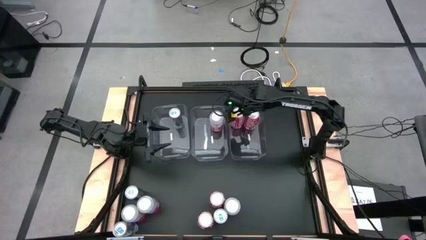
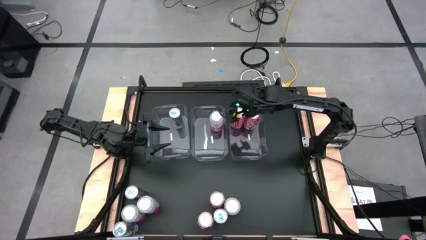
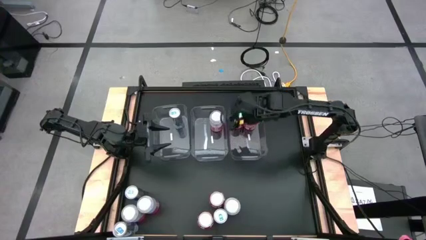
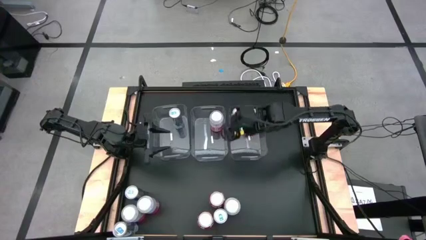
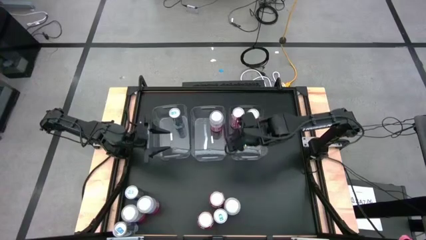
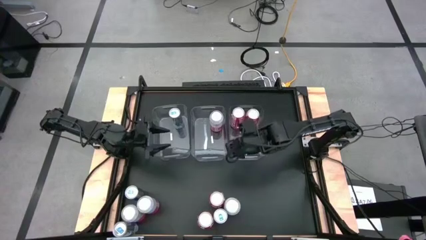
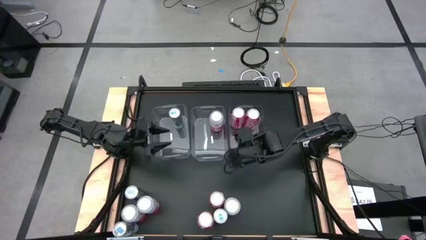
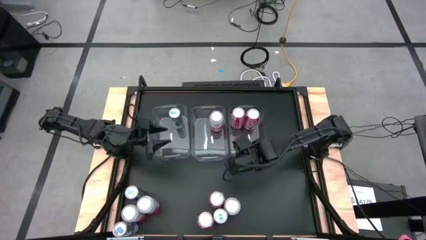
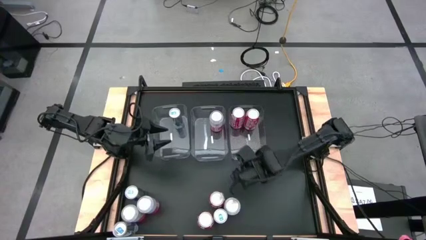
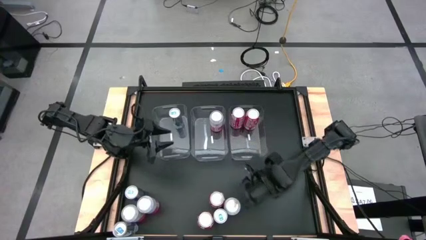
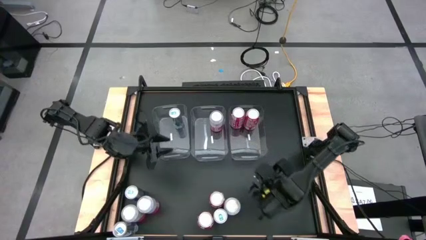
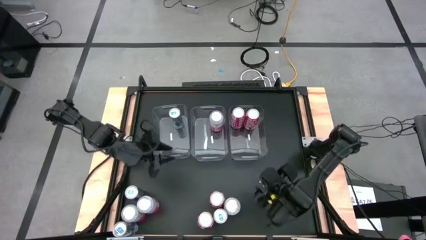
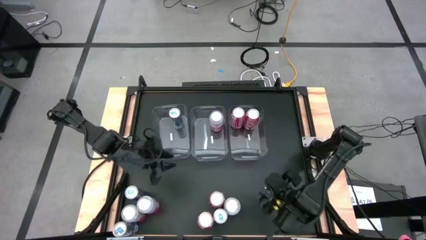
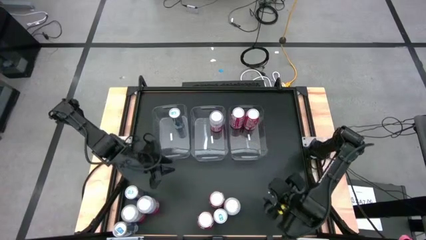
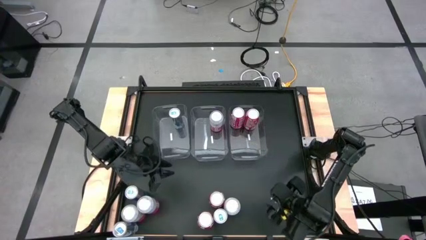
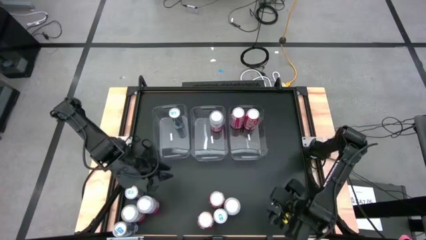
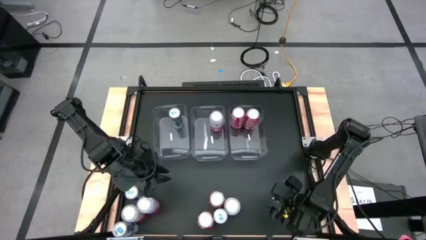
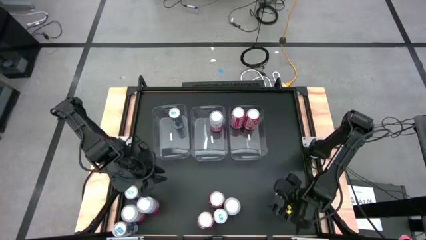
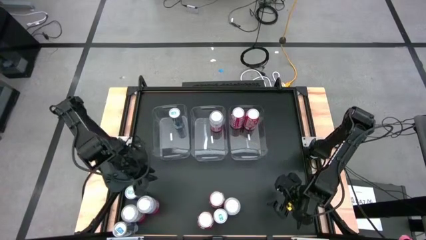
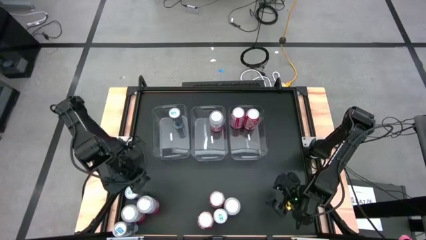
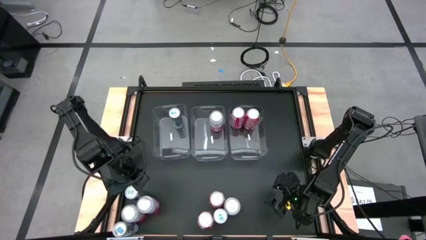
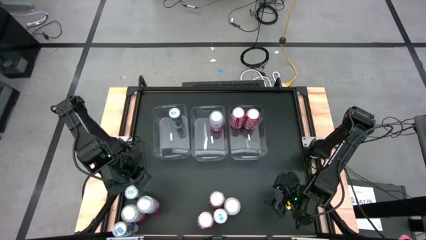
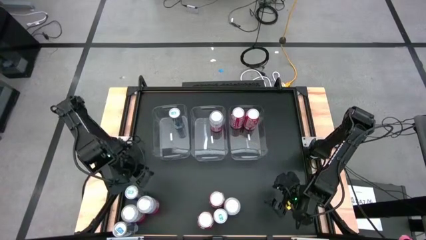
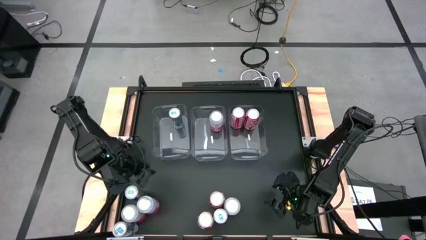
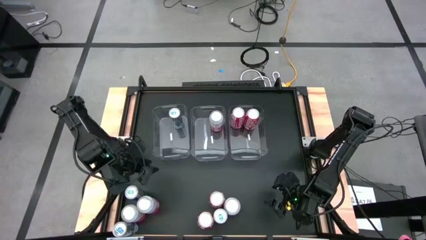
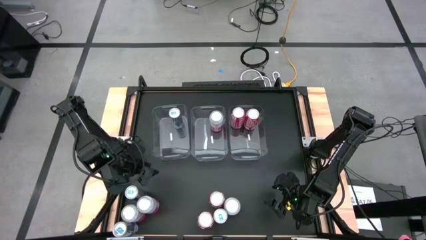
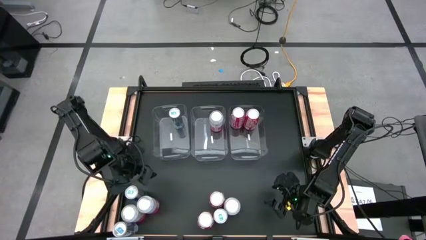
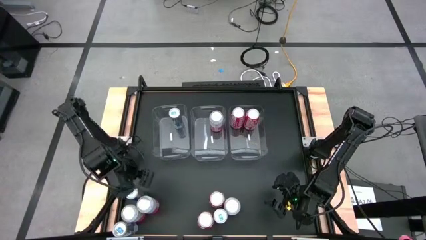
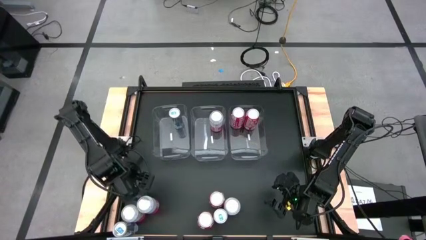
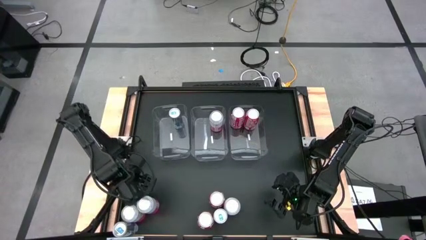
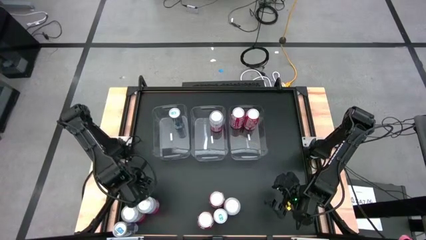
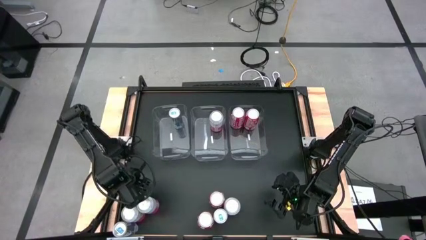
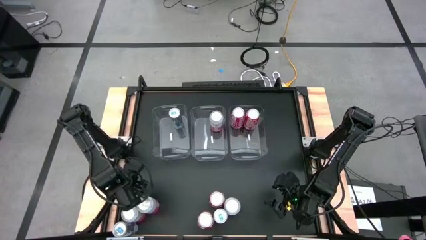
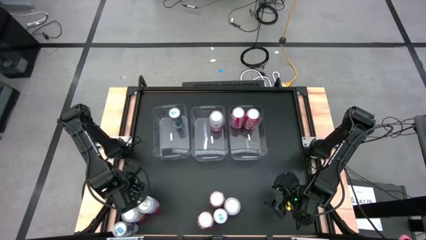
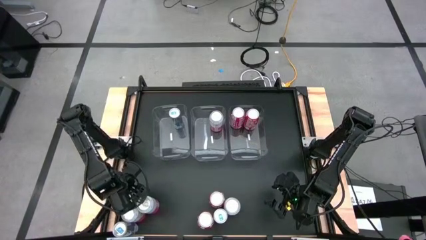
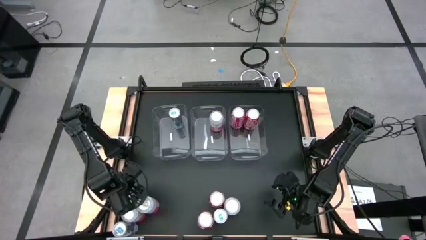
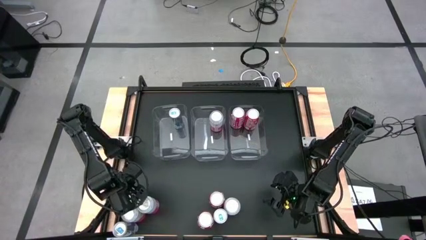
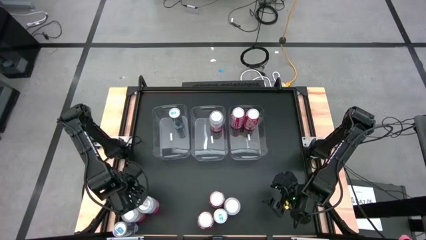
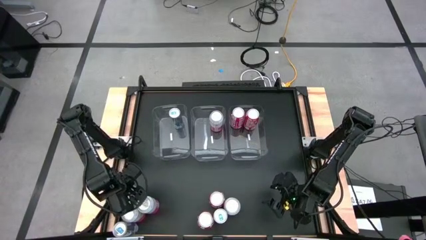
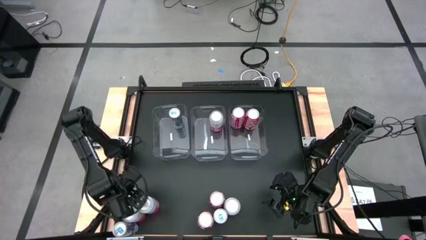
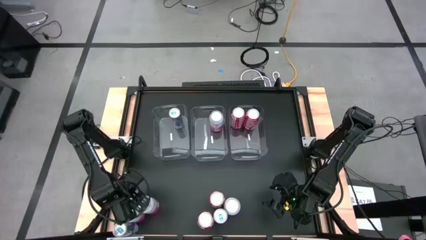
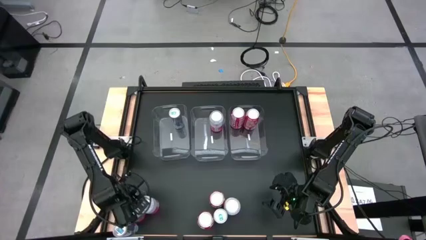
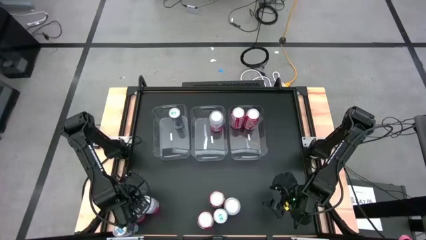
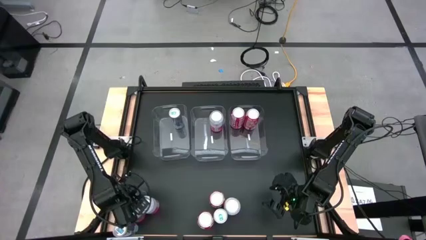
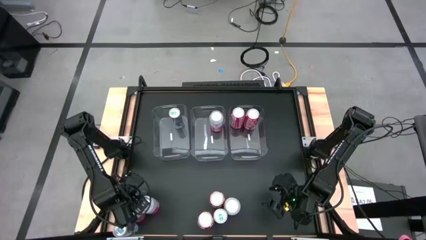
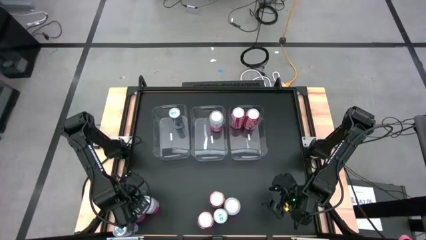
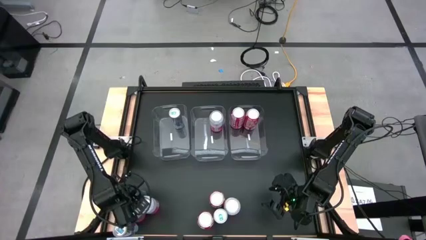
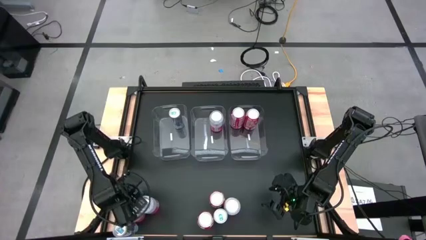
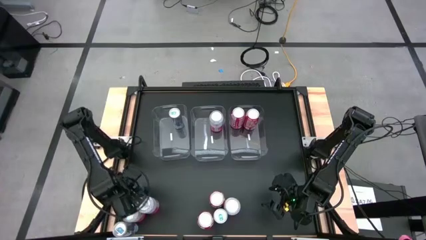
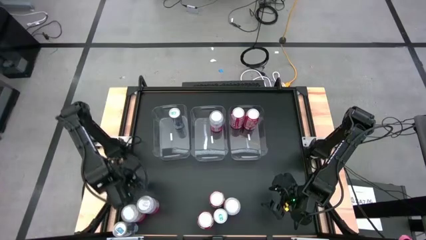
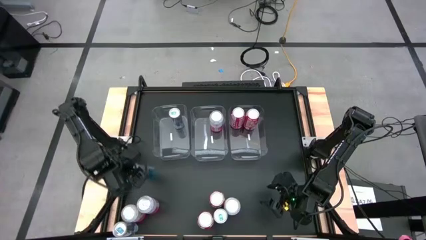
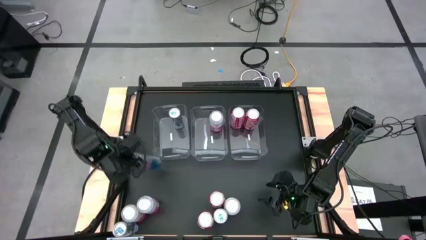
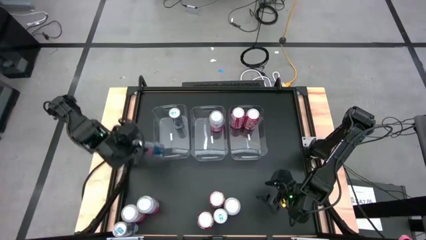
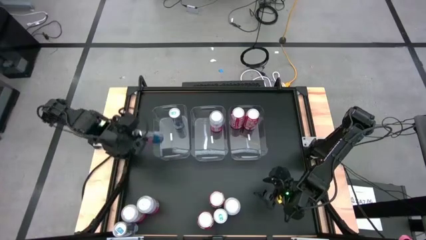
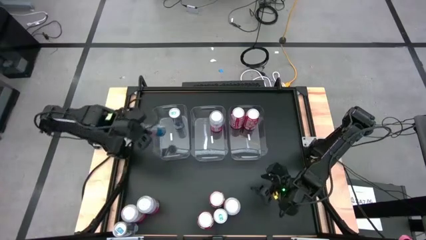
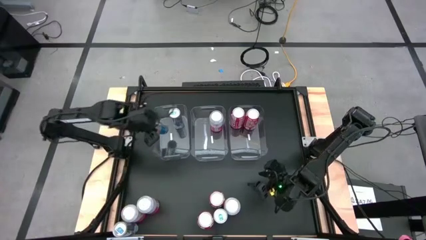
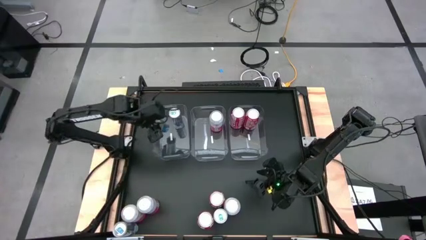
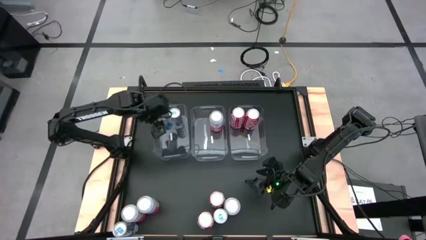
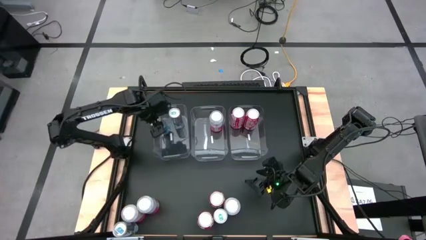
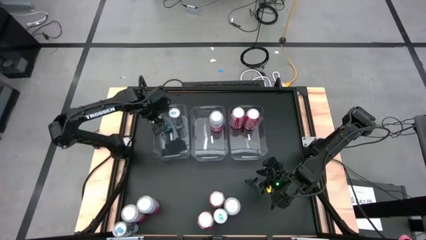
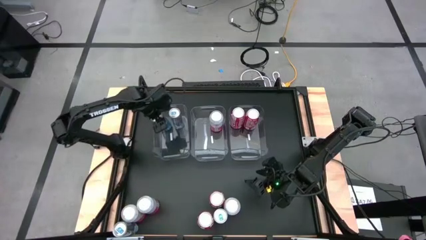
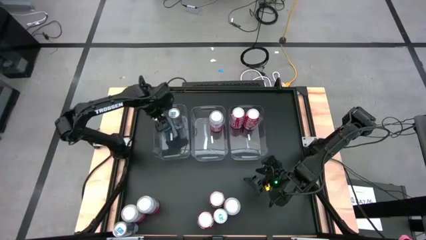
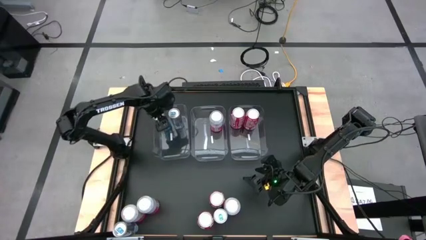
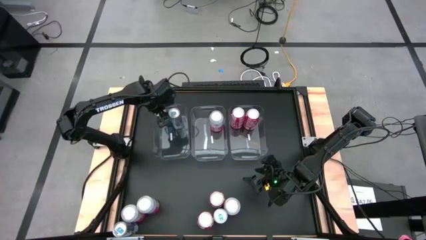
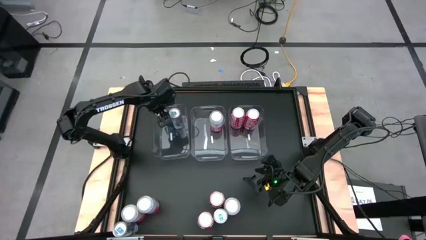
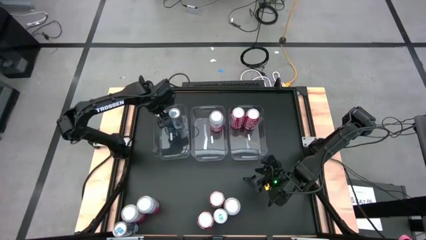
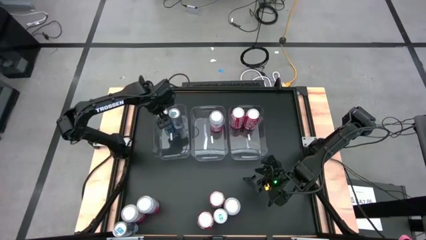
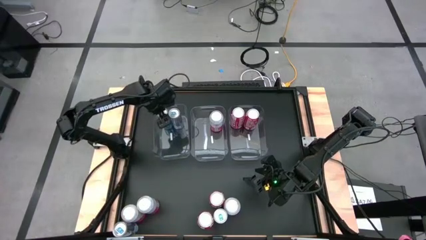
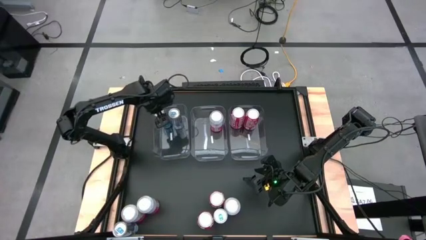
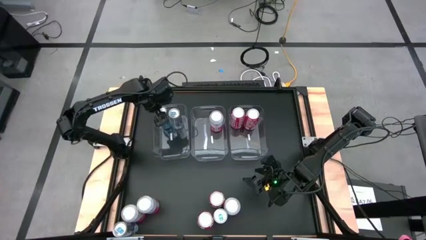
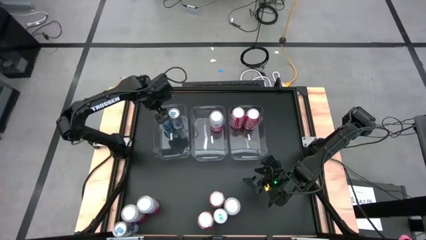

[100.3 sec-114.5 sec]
Task: Sort soda cans
Put the blue soda can into the left transparent bin

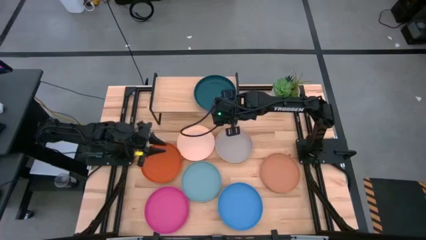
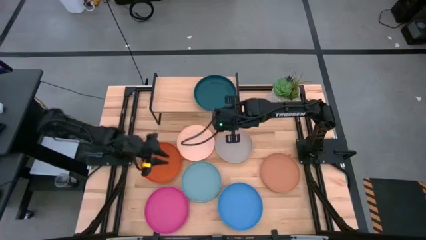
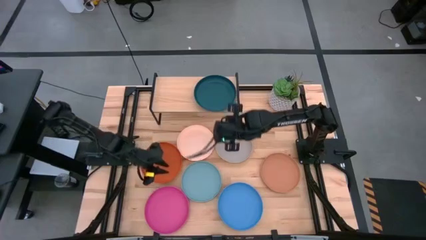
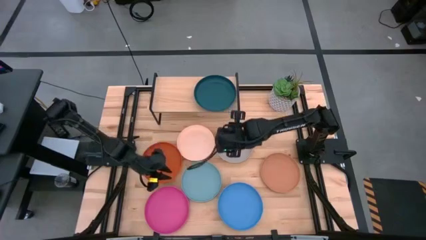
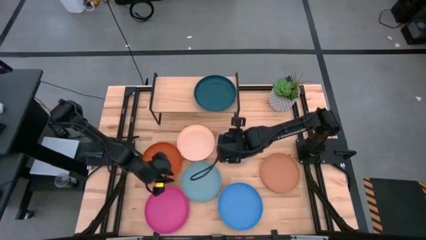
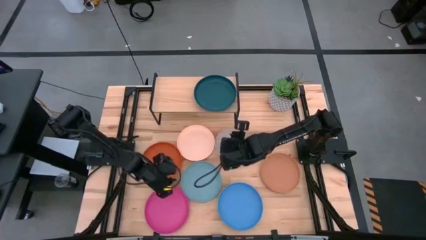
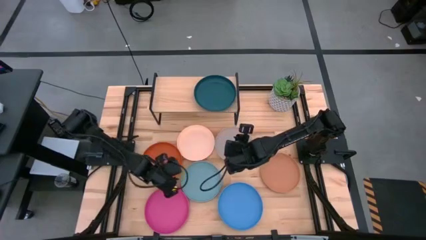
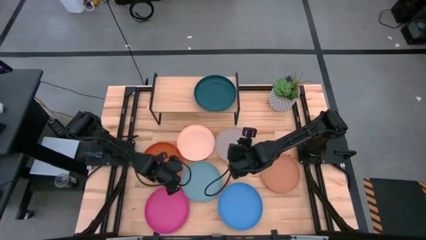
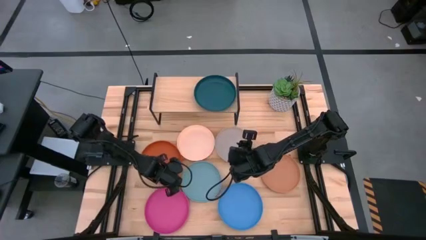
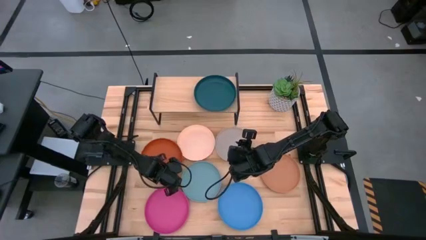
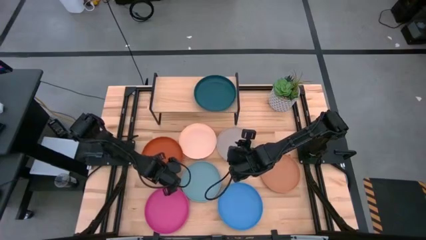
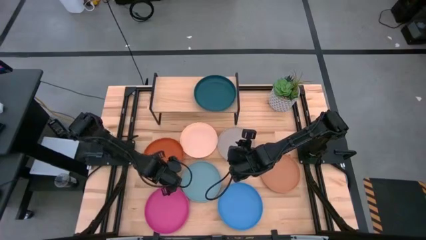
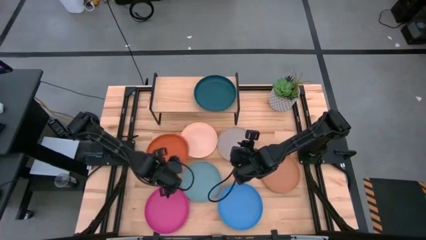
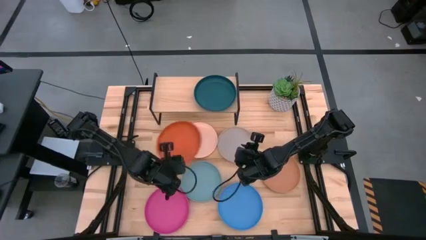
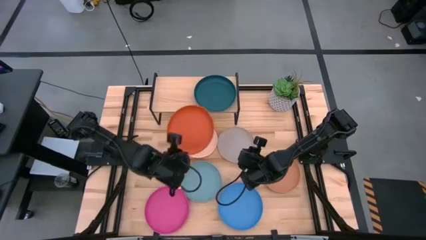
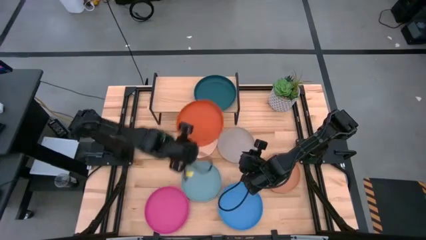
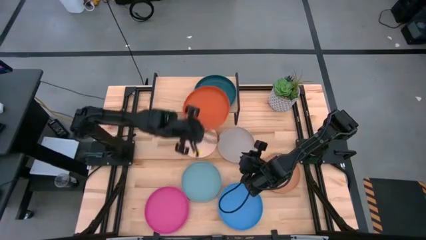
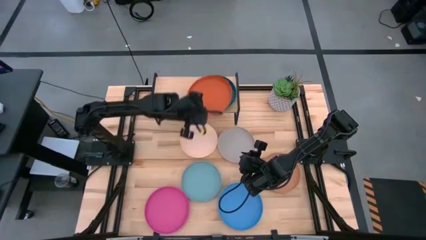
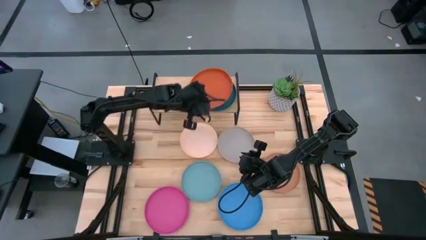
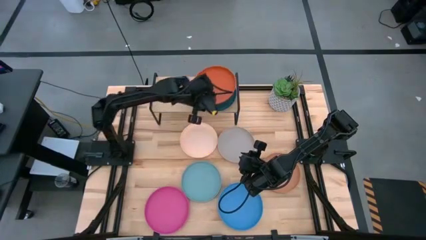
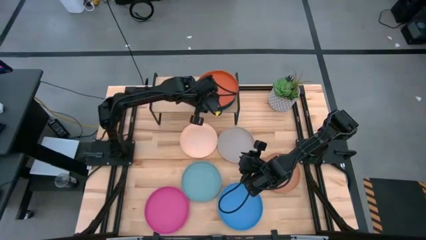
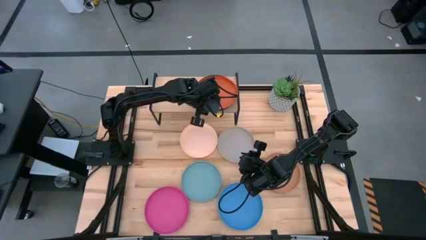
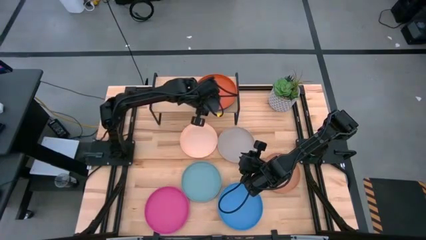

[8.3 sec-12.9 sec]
Task: Place and stack plates onto a shelf
Stack the orange plate on top of the dark green plate on the shelf
